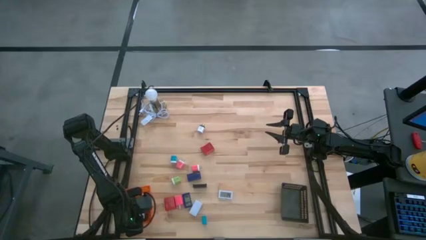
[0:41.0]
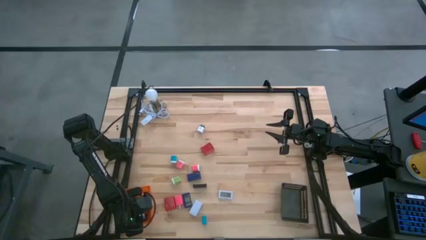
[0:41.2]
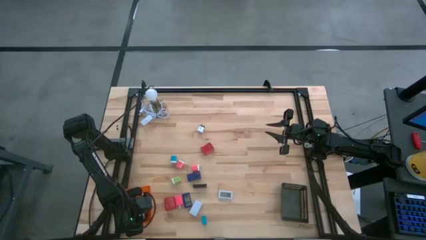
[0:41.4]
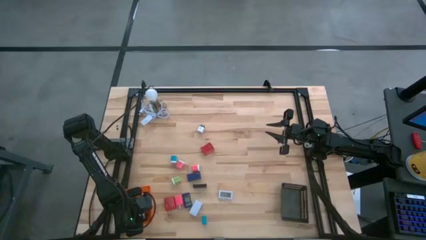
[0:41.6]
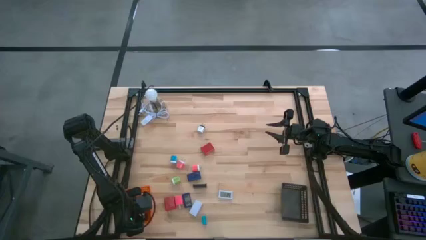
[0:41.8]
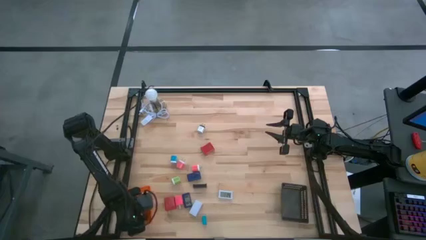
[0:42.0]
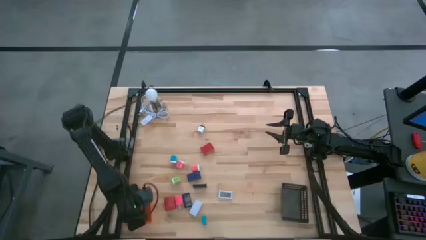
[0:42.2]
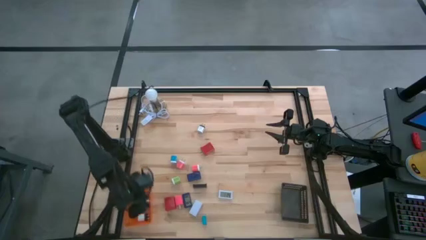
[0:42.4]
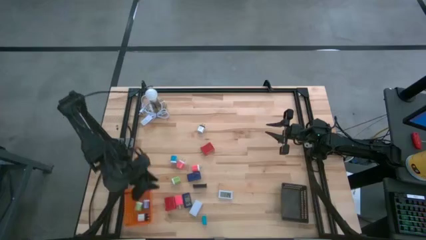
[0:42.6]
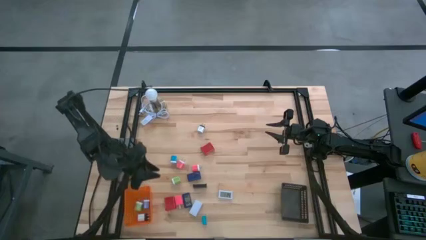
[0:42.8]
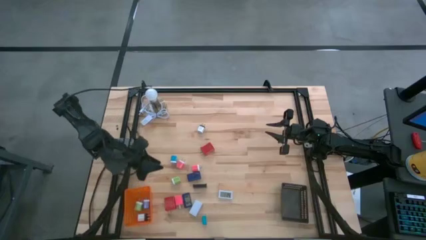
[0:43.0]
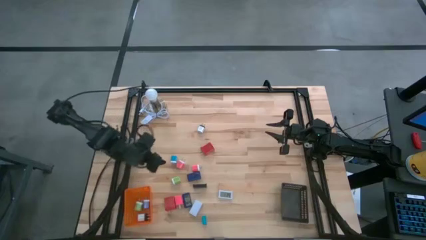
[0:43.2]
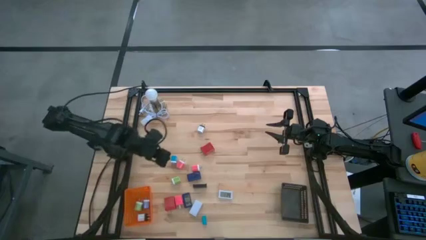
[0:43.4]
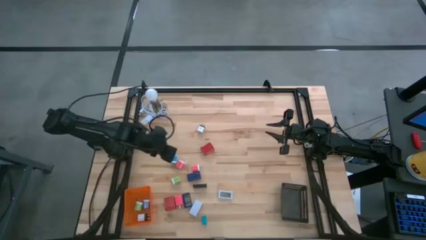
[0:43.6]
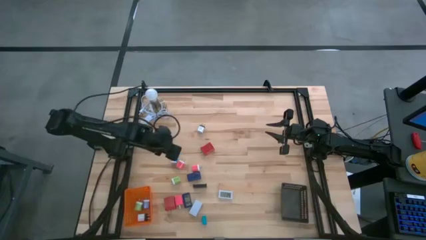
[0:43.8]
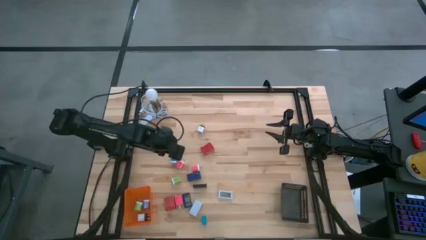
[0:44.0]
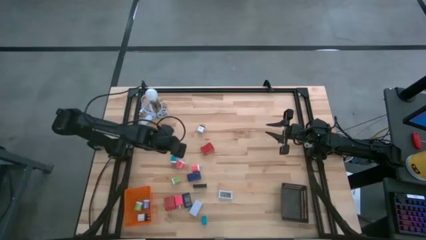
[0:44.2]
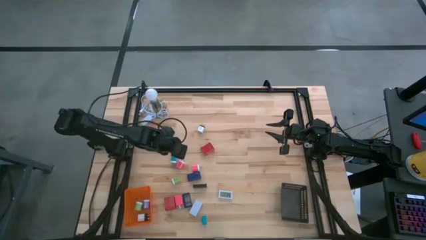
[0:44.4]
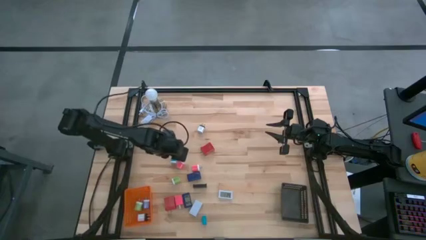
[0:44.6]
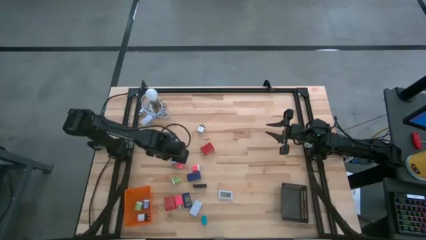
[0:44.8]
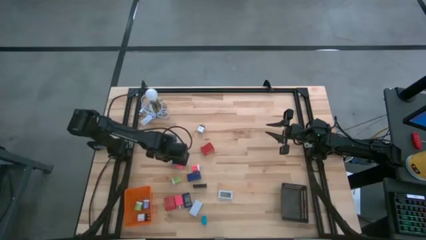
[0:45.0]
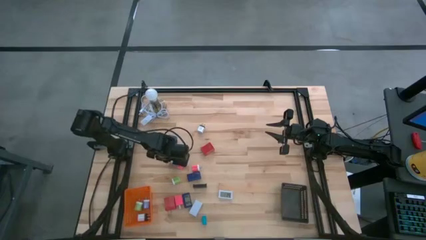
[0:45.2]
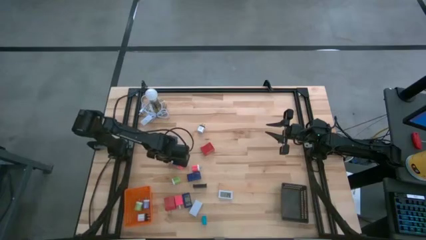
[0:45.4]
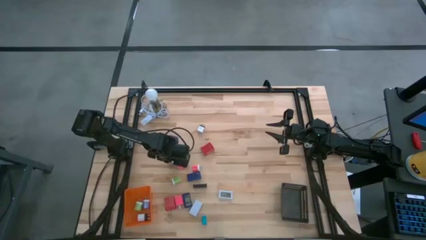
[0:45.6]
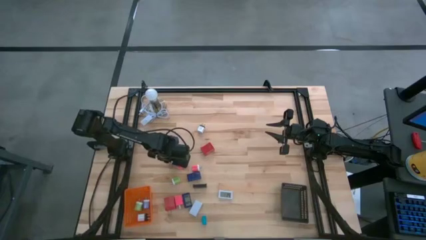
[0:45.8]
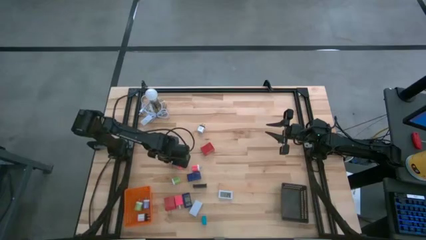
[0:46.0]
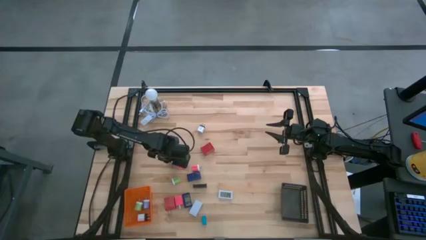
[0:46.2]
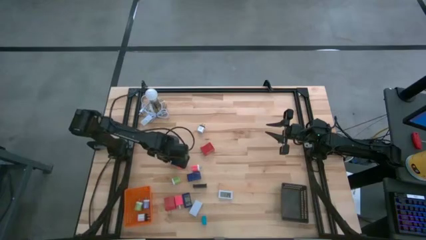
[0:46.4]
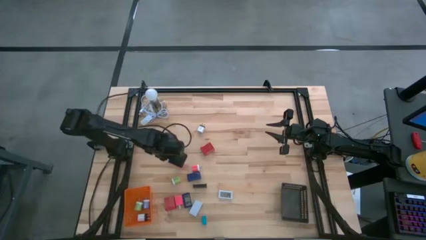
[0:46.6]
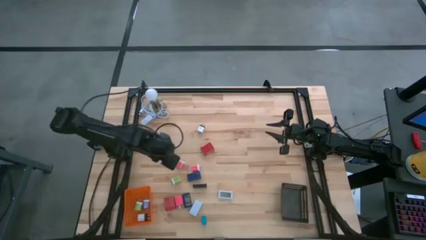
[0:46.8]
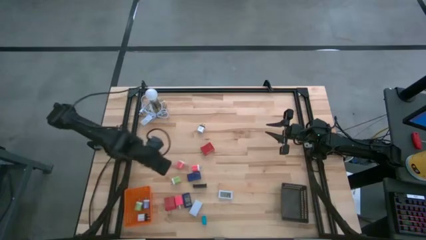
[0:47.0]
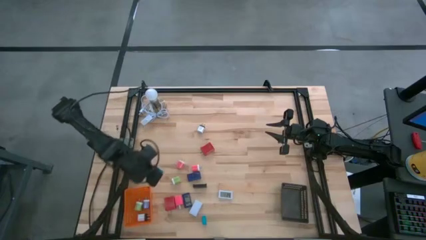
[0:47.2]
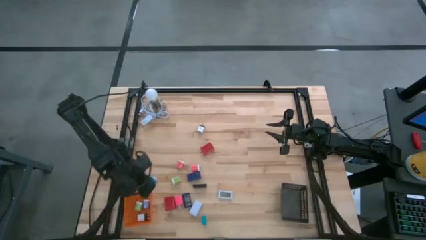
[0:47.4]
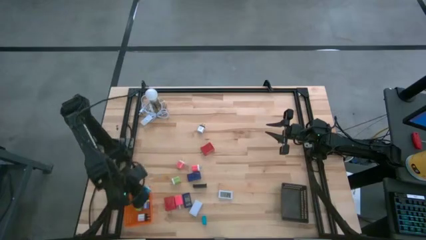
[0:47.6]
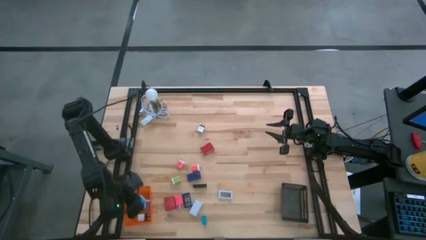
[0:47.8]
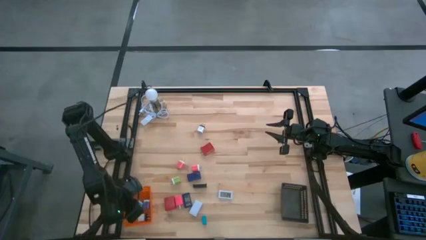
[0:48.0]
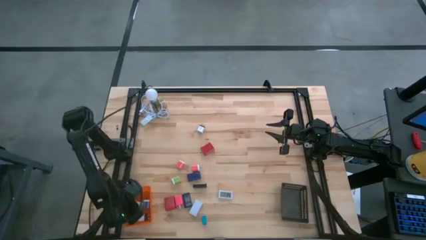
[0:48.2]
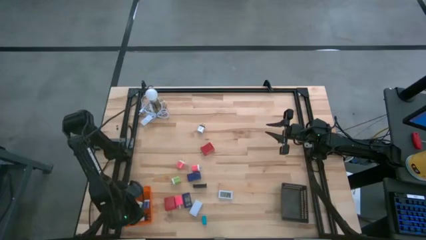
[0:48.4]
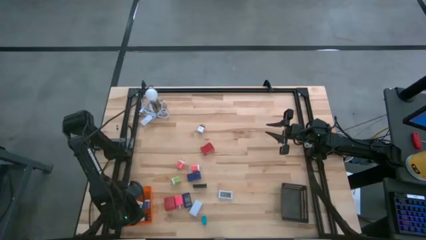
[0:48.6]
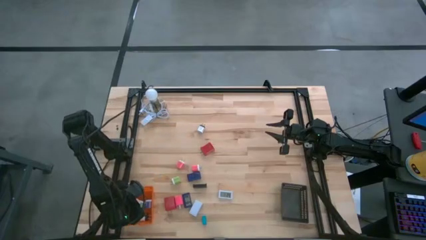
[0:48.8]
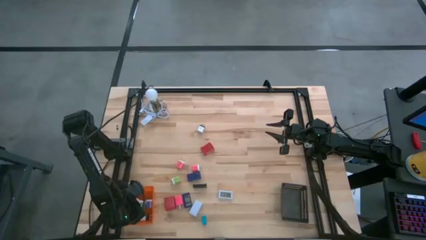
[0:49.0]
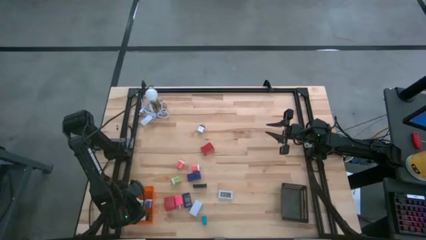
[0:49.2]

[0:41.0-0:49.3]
Task: Pick & Place Office items
Put the blue charger adapter into the orange bin

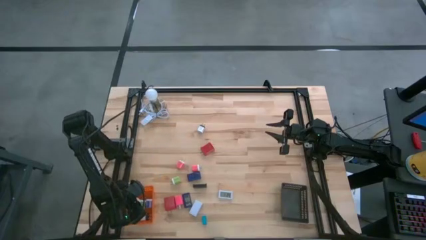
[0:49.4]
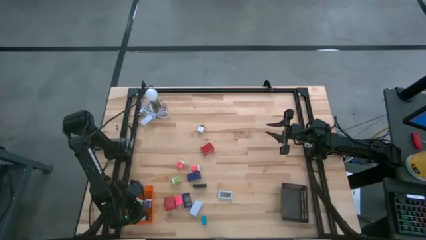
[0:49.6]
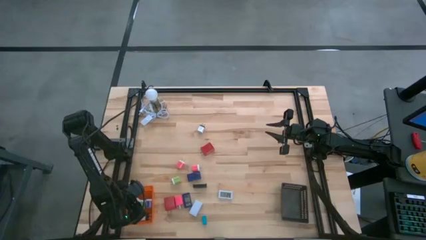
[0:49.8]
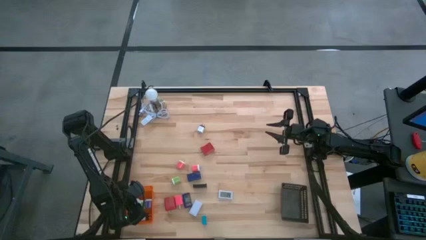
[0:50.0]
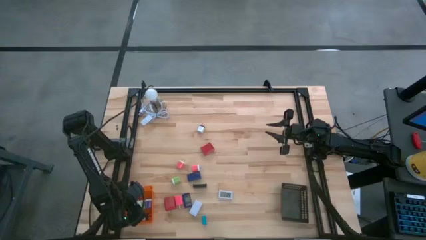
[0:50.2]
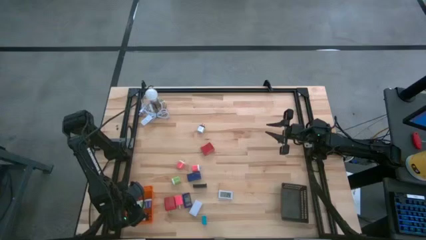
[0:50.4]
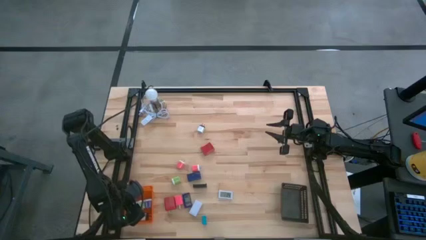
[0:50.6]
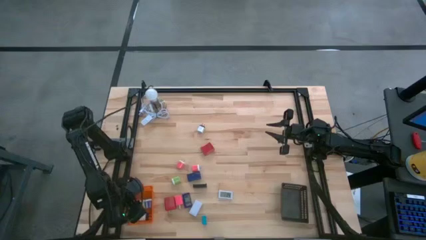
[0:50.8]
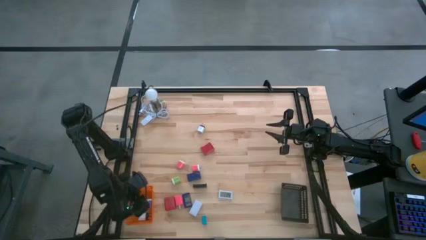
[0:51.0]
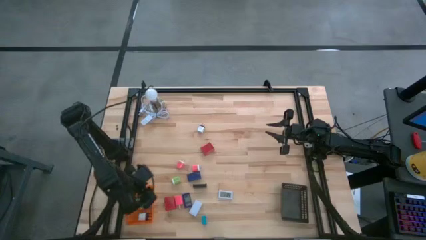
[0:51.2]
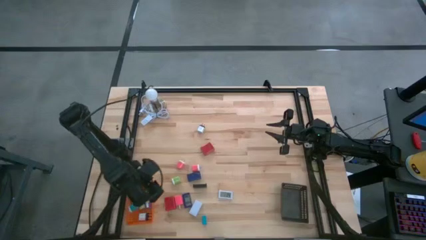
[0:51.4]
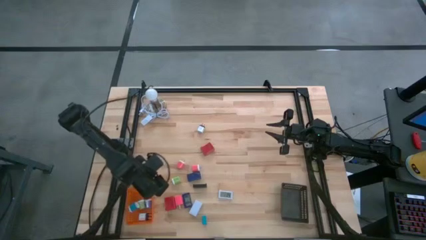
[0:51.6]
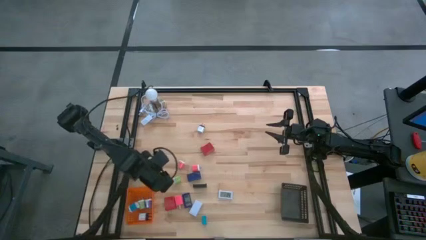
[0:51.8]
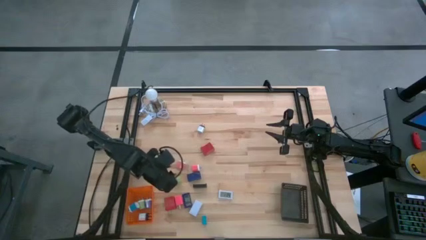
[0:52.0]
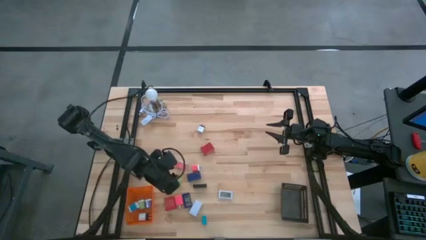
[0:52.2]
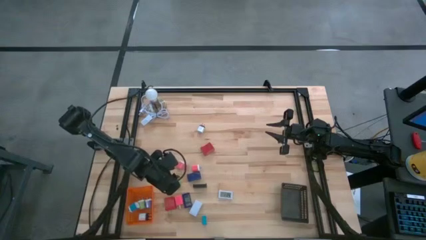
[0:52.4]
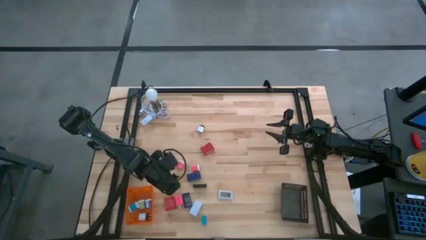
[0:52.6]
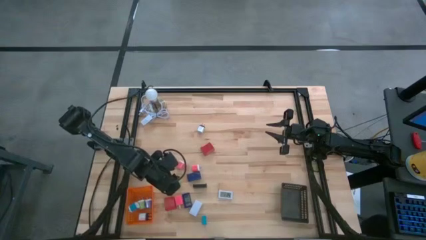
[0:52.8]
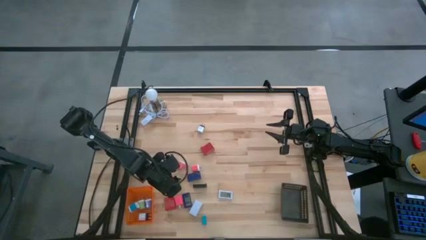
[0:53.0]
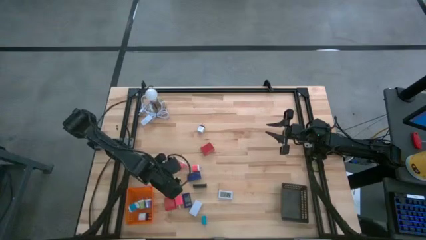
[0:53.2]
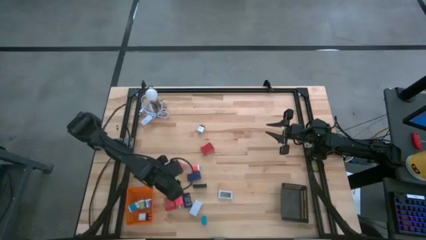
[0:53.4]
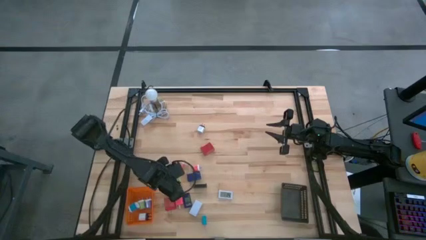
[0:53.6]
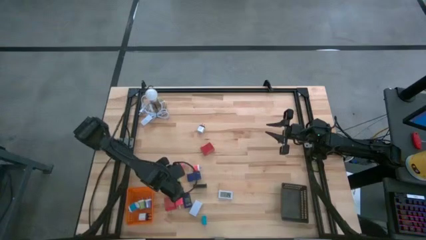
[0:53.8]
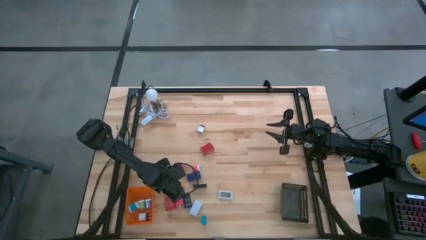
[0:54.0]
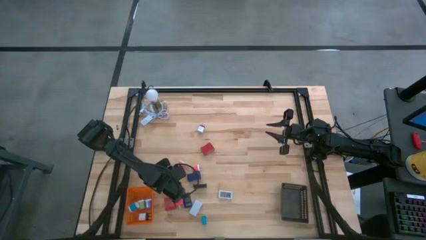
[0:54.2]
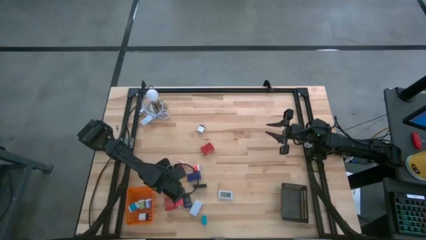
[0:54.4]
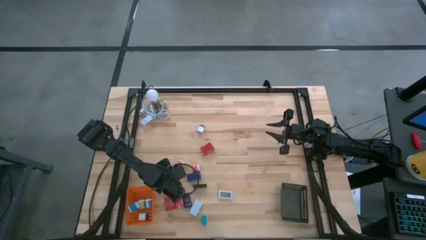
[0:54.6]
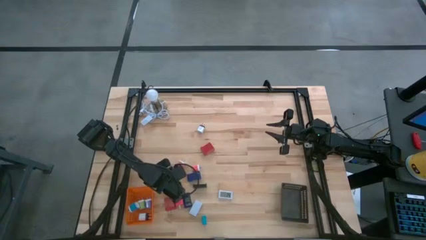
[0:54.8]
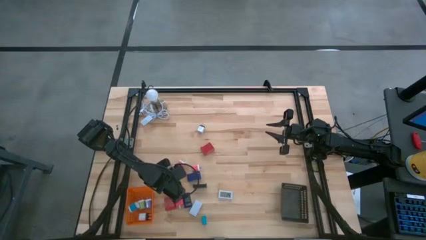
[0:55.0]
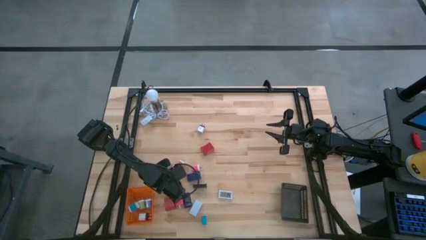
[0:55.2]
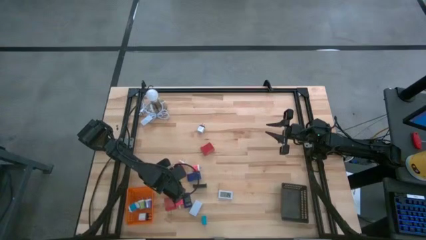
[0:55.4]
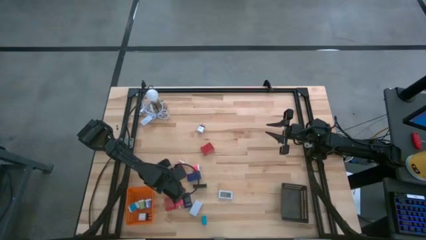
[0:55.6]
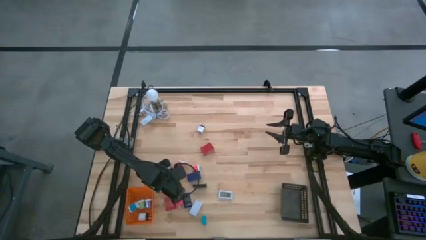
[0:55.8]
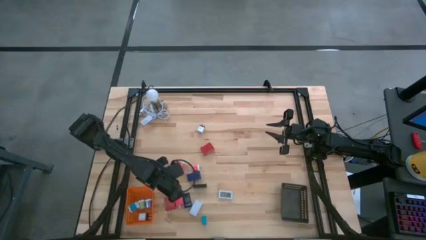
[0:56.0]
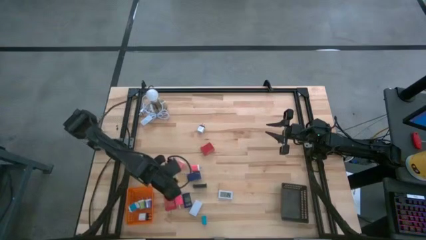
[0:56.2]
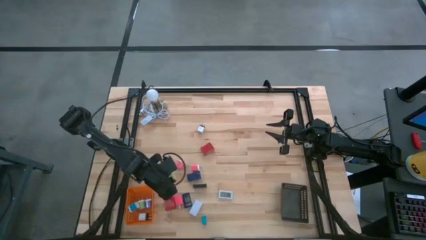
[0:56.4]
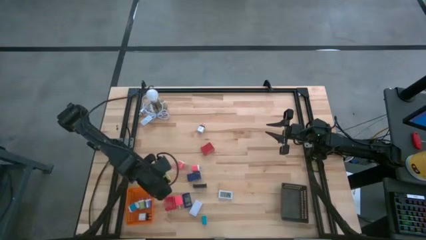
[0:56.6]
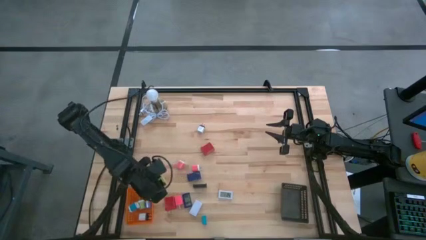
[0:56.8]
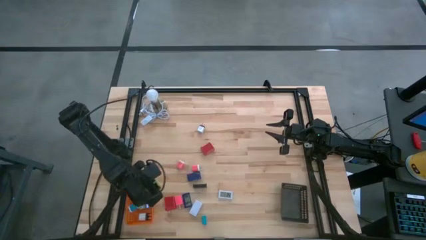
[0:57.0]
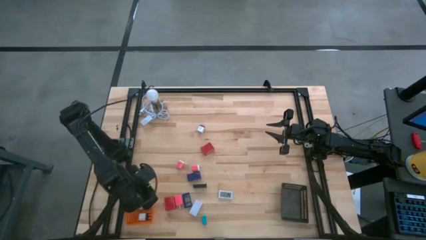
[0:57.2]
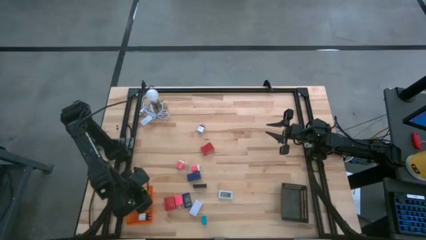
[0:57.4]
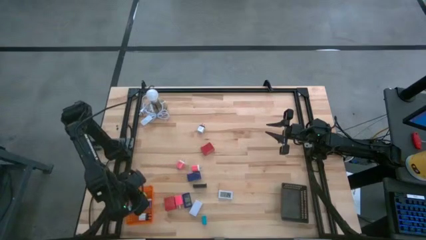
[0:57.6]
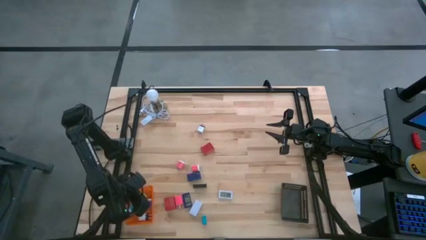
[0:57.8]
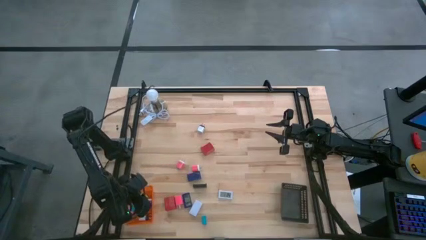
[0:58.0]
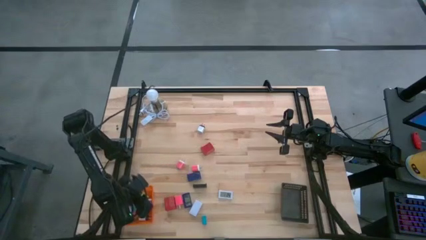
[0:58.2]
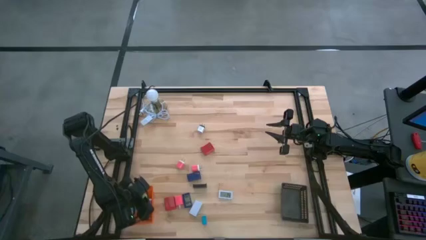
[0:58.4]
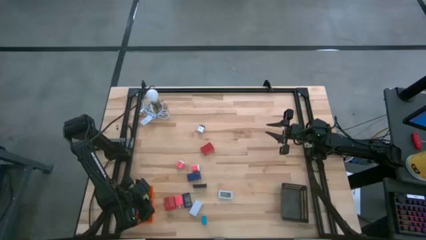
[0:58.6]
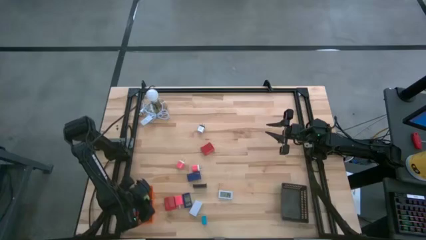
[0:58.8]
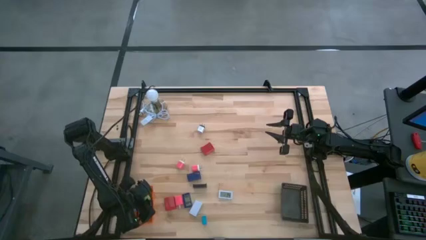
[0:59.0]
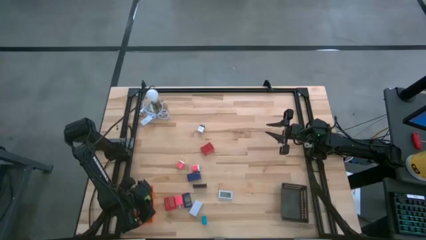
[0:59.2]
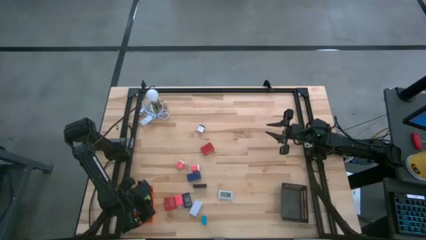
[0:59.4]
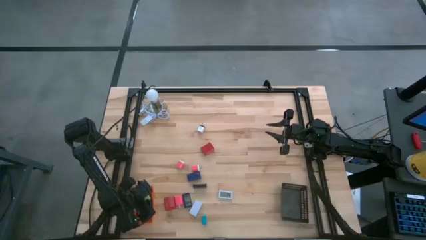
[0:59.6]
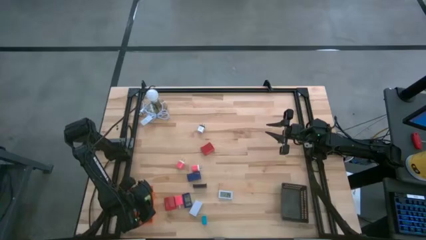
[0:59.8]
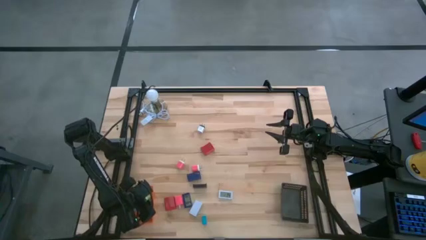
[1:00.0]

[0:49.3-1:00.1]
Put the green charger adapter into the orange bin
